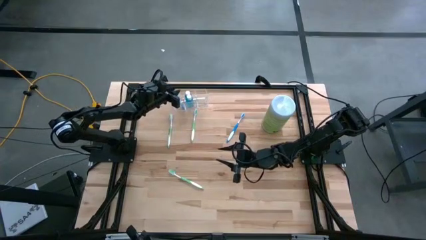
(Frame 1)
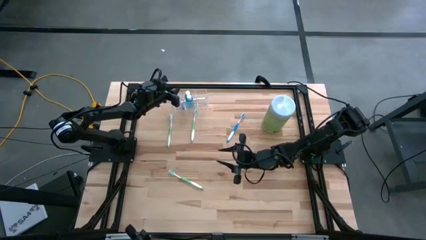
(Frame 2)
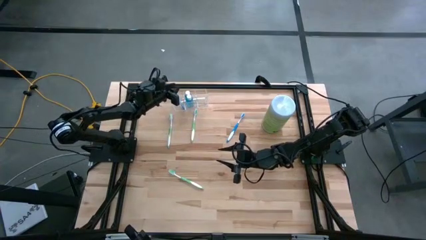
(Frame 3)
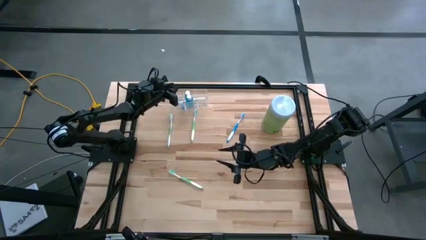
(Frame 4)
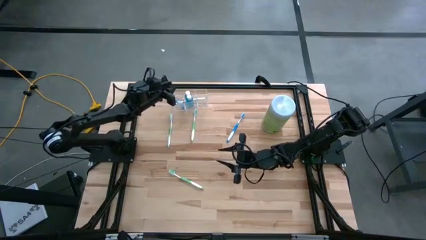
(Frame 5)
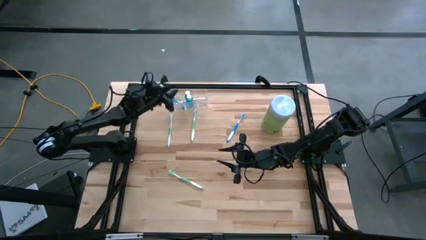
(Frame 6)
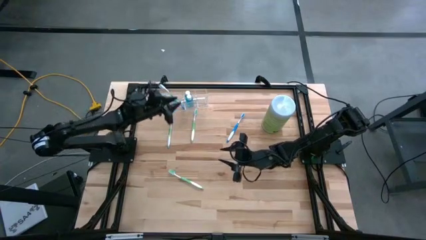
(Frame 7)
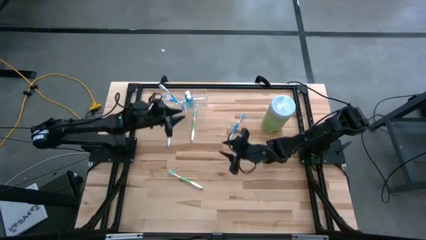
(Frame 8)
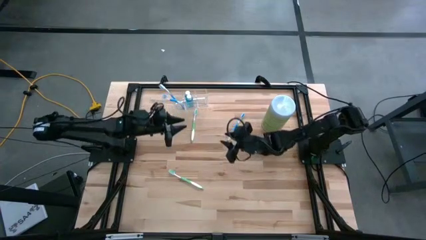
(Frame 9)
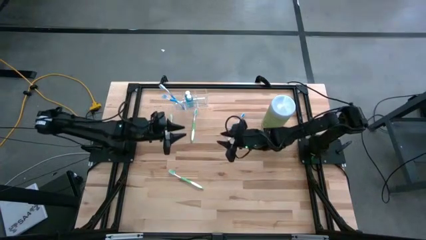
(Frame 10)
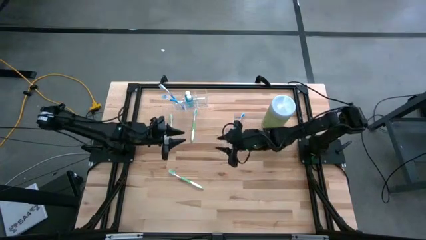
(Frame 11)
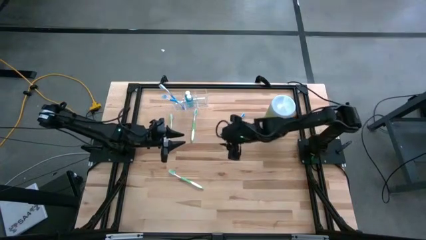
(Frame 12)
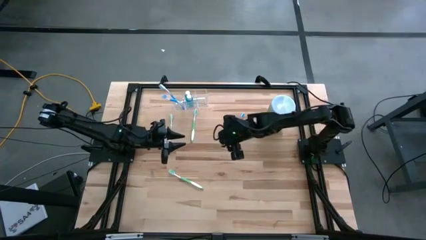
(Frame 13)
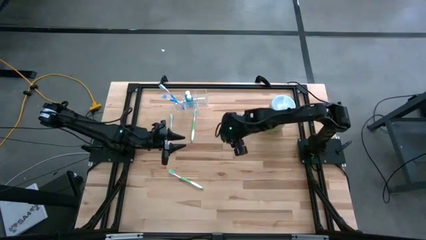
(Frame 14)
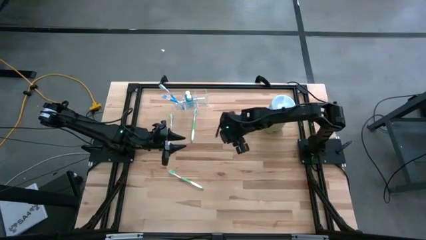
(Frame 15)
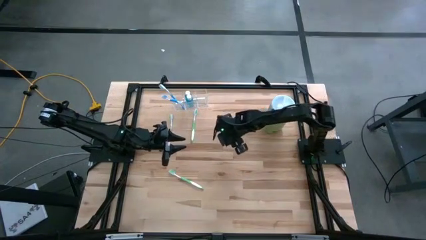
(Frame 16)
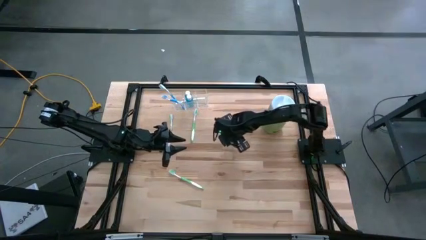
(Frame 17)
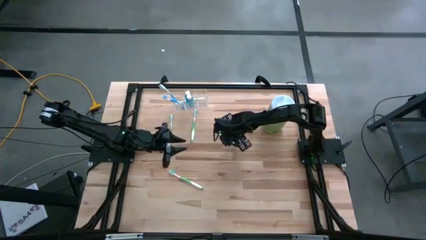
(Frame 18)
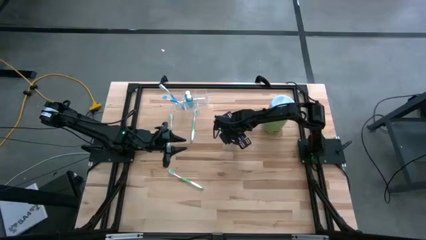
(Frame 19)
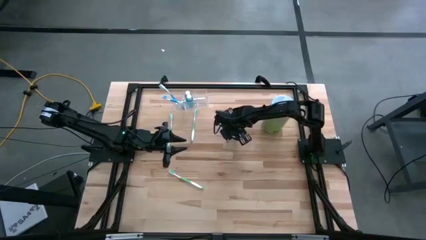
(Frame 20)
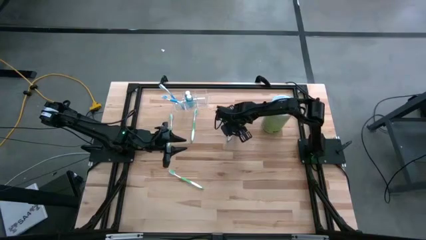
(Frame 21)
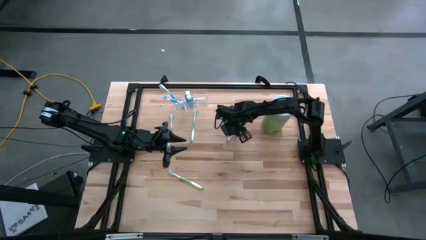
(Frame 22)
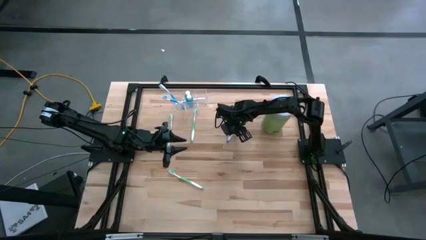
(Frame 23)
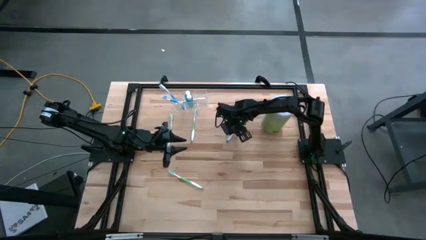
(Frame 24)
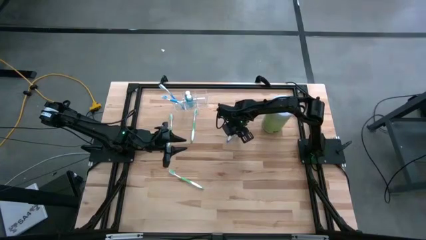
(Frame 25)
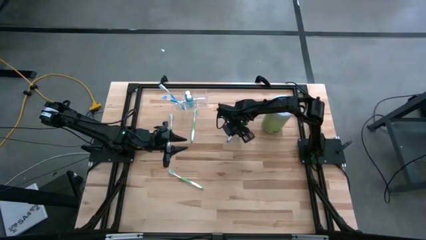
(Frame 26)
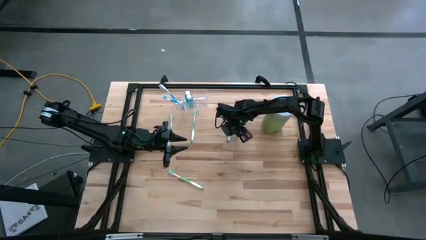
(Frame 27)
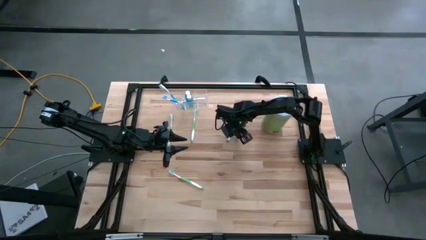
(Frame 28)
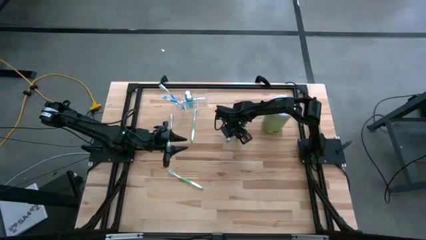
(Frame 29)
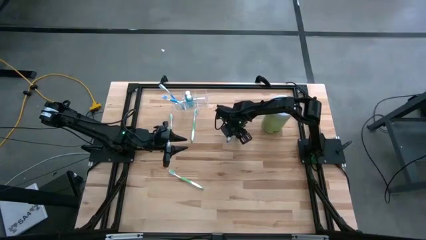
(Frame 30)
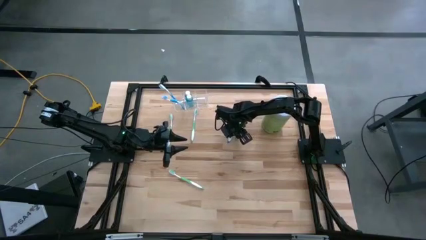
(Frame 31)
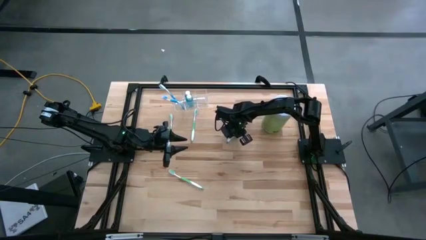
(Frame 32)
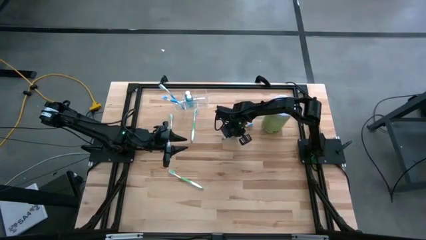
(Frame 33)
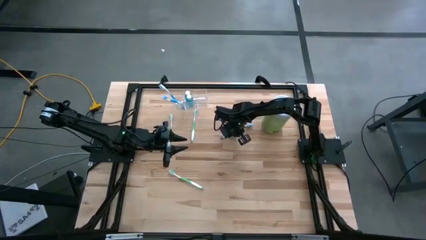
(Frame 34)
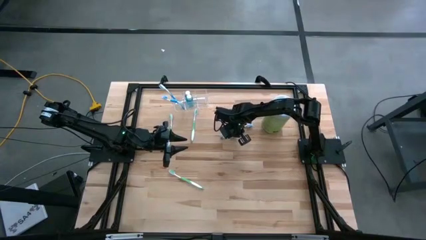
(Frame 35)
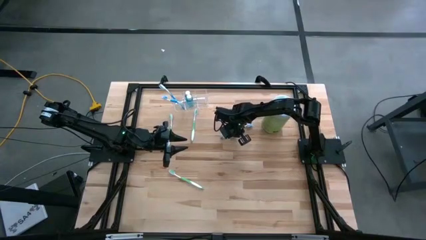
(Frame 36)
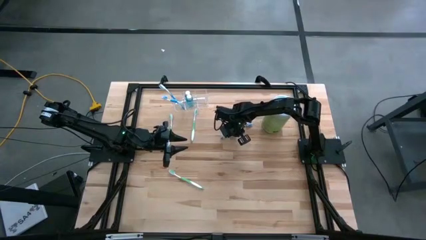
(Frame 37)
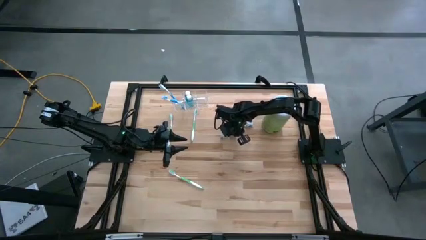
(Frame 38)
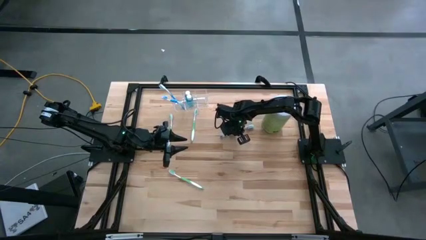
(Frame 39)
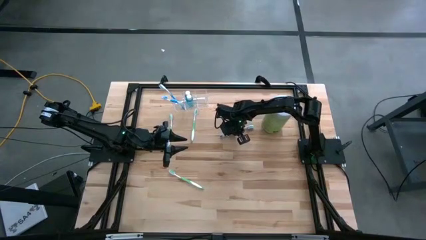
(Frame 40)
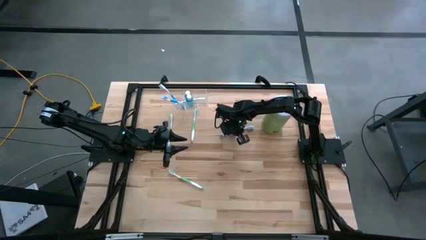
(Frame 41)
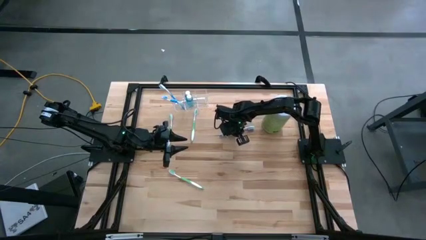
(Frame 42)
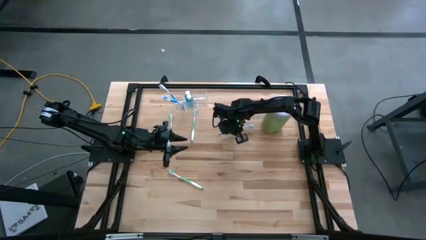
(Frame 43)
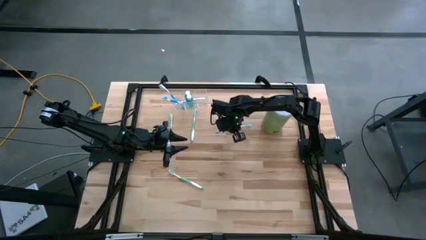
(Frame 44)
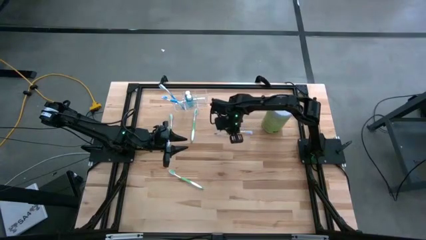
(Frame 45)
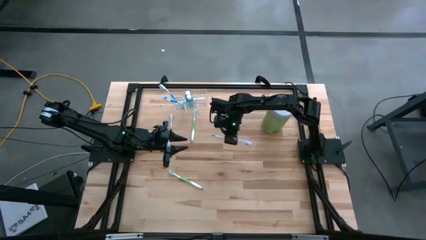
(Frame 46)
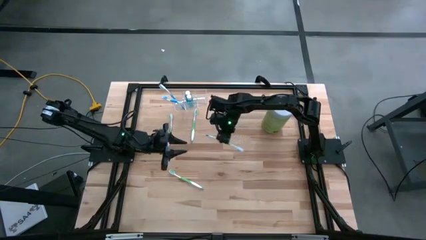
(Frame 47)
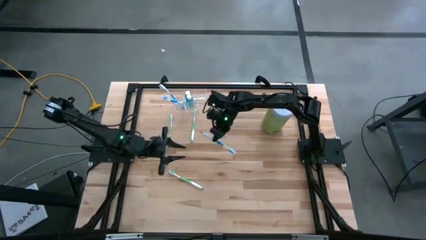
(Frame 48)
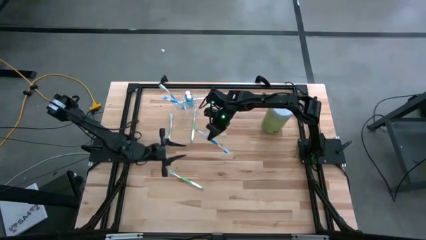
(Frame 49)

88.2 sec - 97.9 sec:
Task: Pick & Place toothbrushing station
Put the blue toothbrush into the left section of the transparent organizer

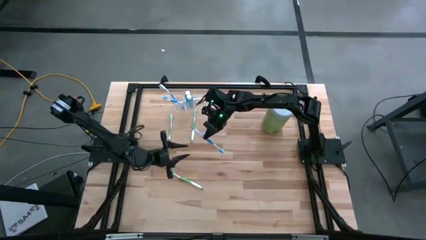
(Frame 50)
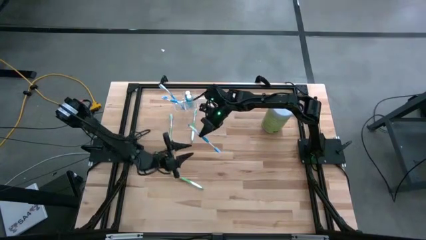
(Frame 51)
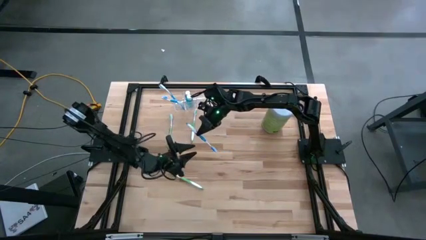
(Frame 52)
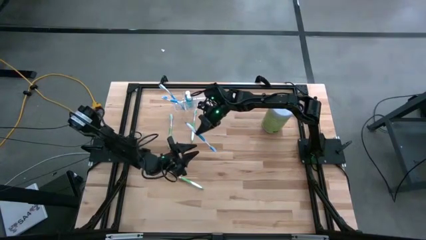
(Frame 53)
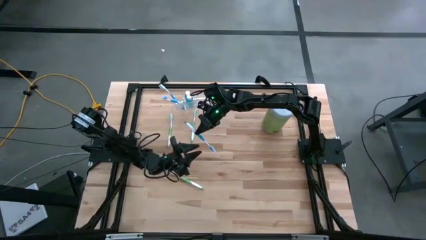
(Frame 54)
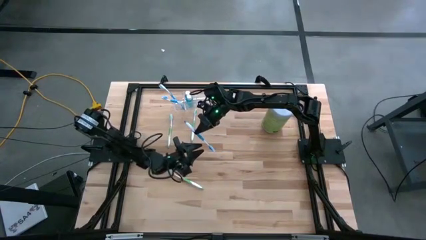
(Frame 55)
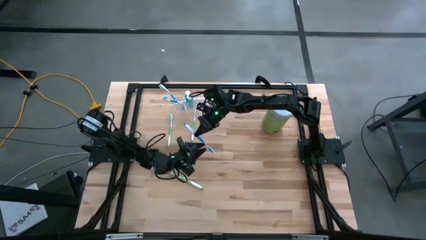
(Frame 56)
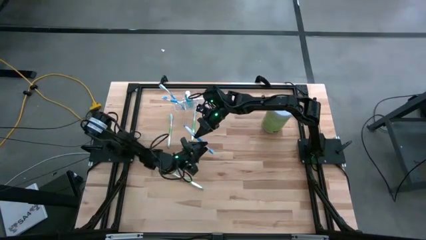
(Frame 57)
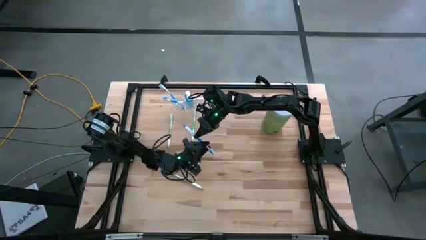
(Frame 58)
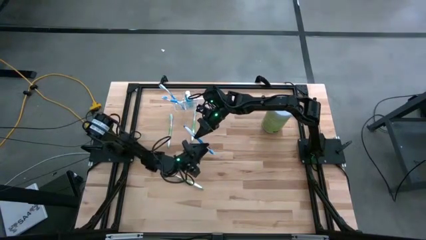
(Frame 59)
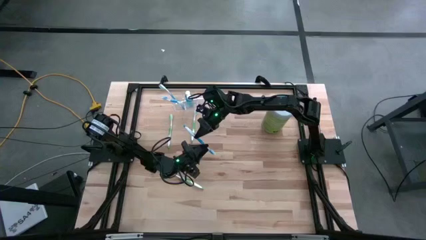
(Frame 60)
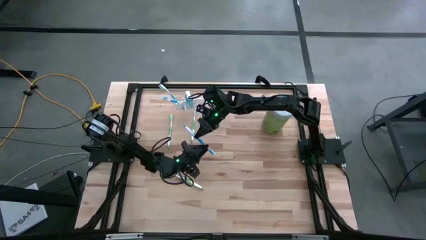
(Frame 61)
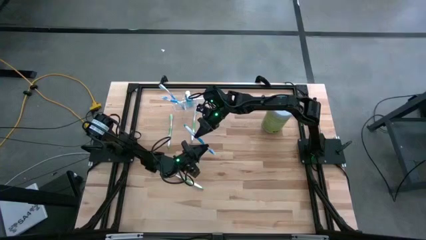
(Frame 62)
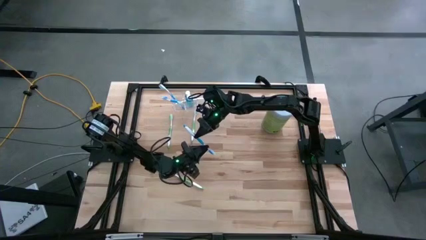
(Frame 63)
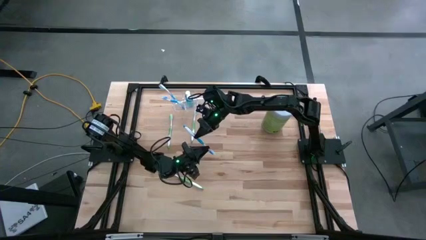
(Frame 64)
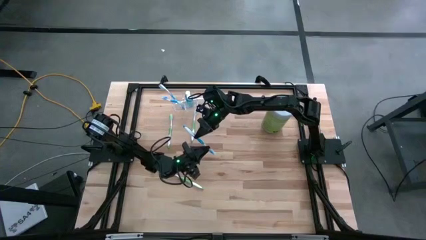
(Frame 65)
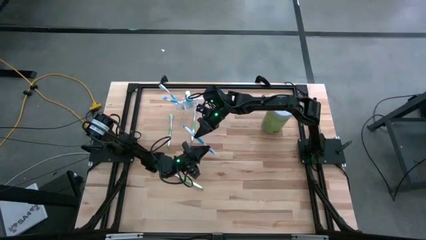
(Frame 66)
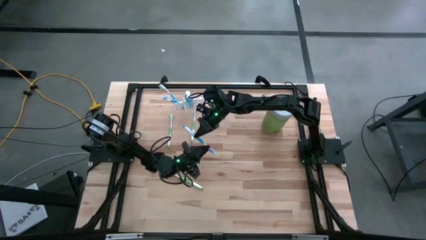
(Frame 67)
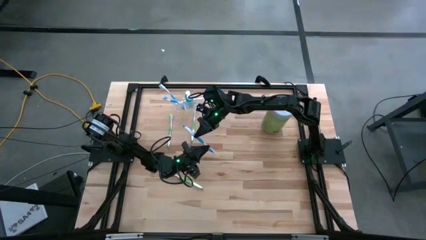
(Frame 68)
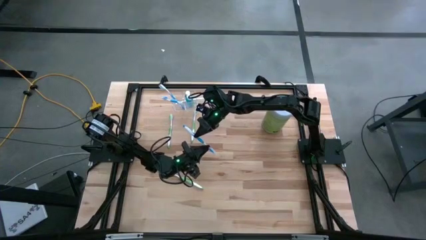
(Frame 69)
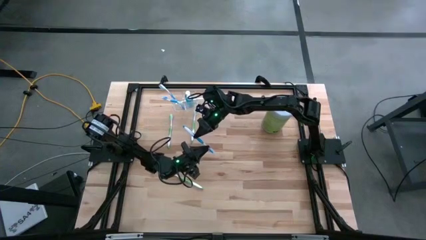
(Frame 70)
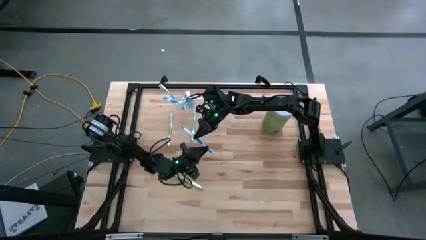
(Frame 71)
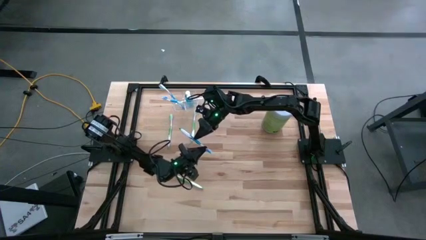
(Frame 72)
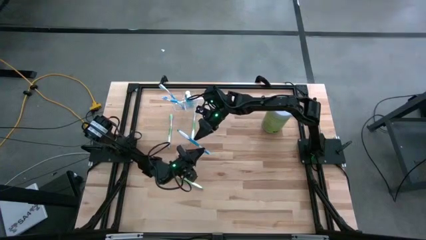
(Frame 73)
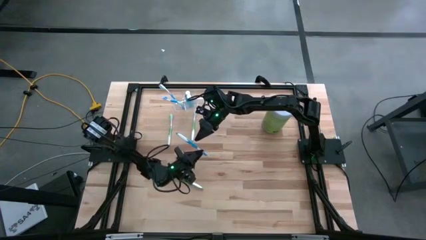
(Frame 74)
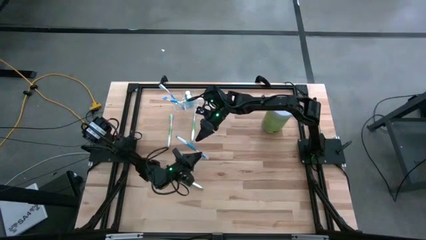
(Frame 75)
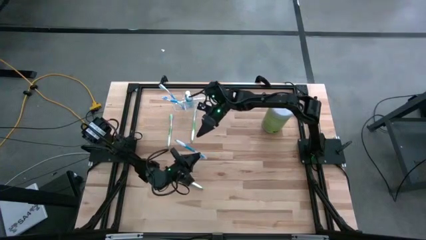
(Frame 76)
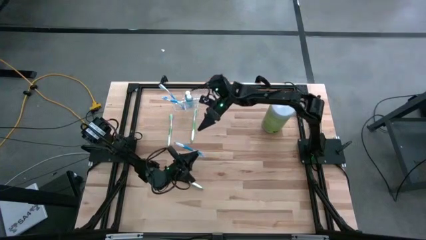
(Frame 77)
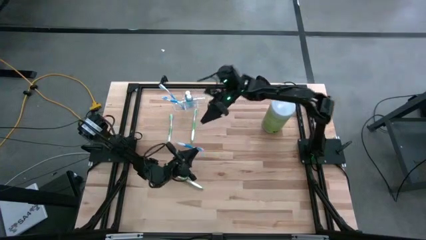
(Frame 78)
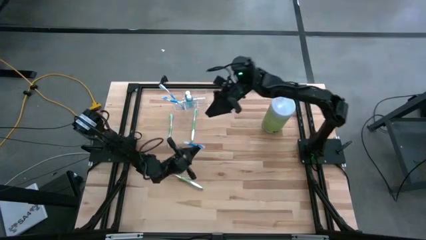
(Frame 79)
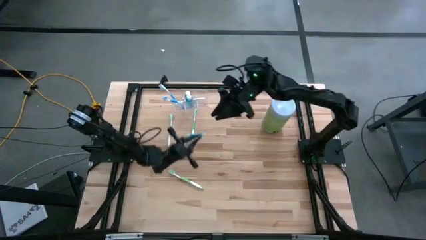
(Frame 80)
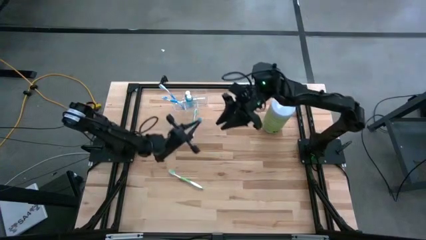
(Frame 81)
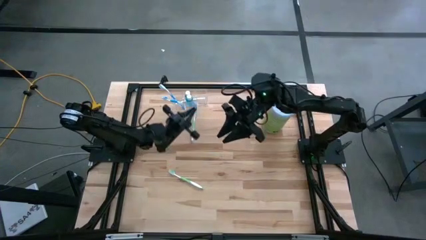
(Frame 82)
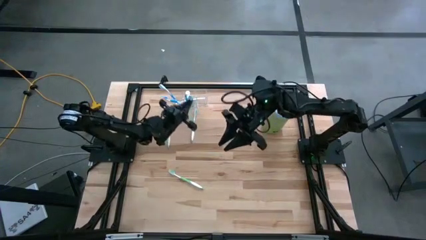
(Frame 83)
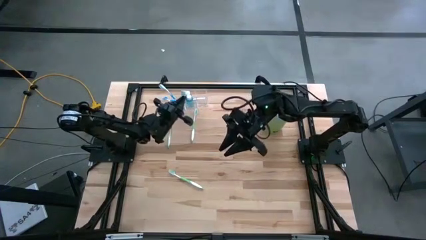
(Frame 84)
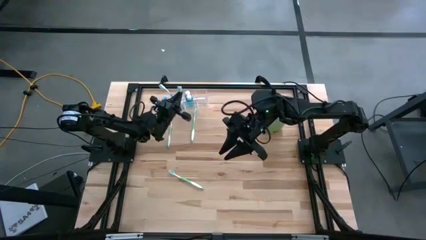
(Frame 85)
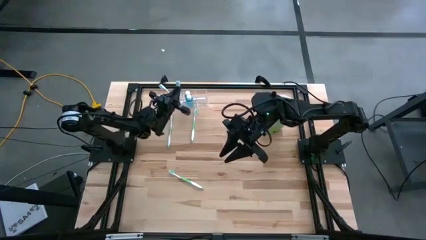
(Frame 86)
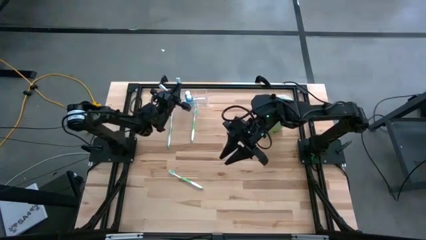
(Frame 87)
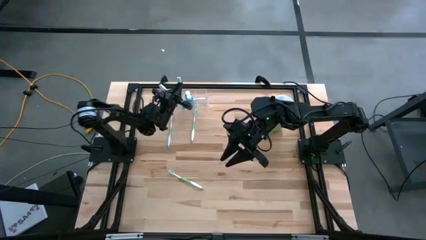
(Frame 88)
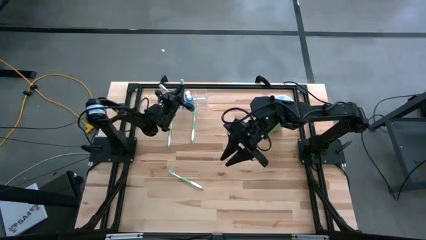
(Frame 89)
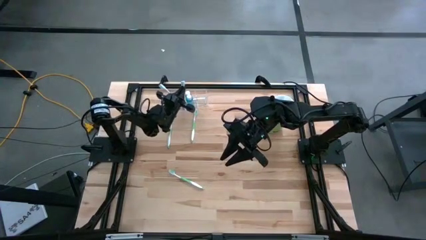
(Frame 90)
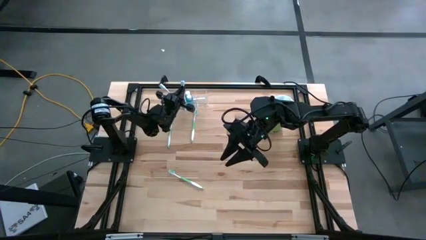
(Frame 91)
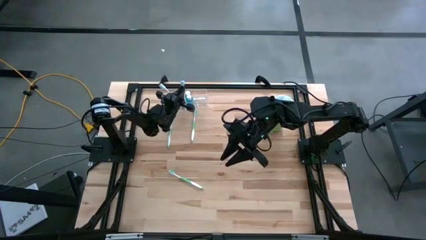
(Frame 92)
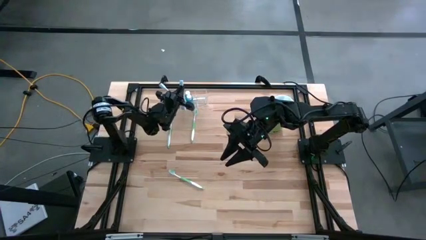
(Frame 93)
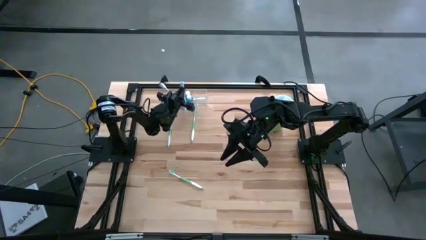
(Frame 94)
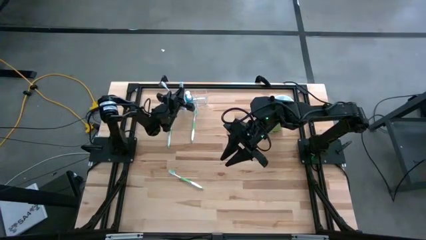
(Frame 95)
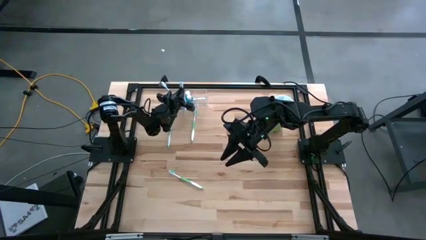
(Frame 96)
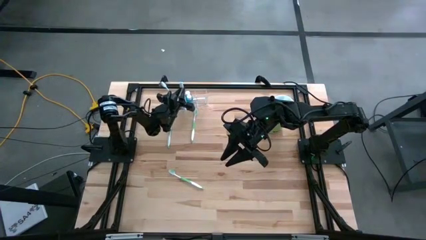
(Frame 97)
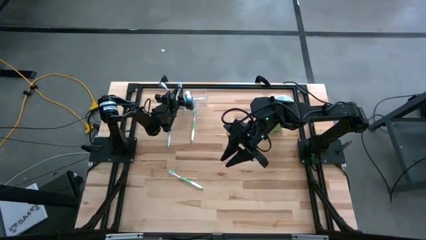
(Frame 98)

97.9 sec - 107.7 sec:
Put the blue toothbrush into the left section of the transparent organizer
